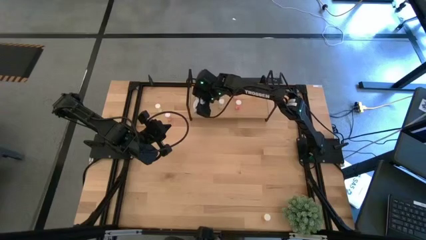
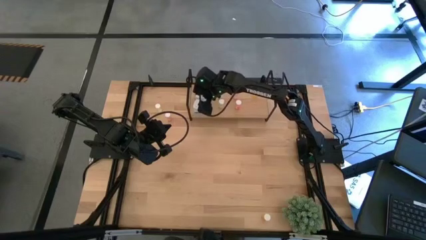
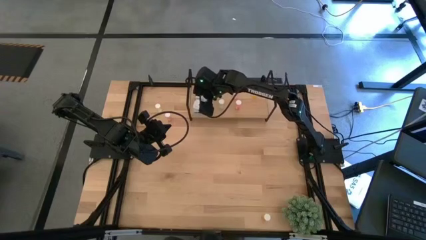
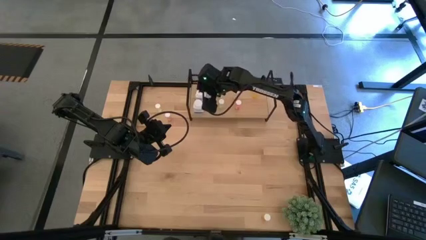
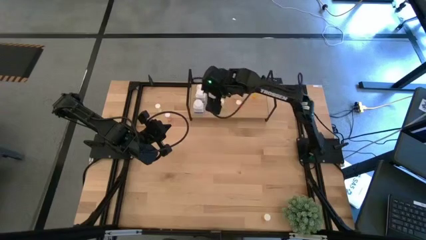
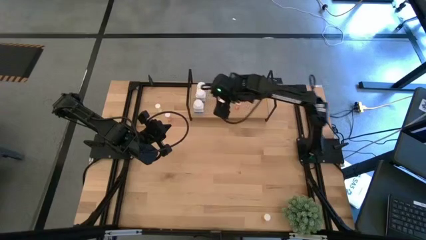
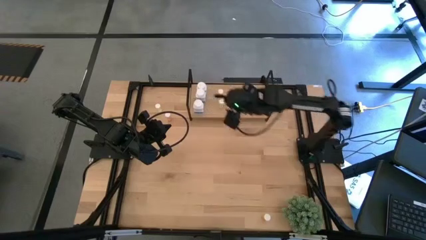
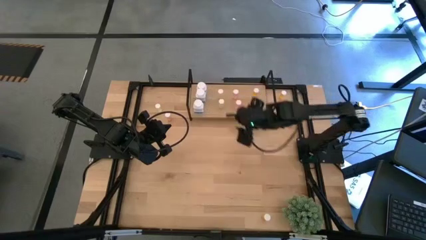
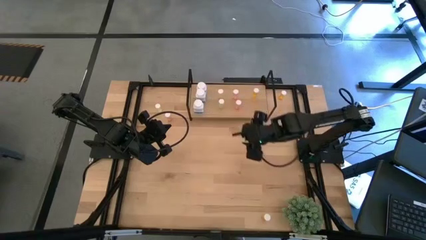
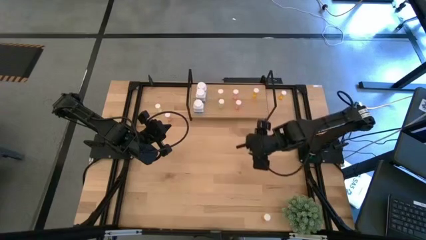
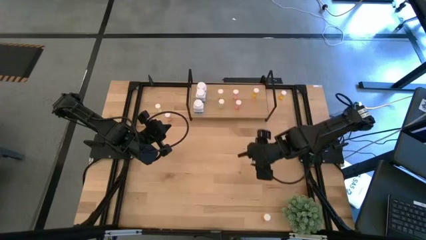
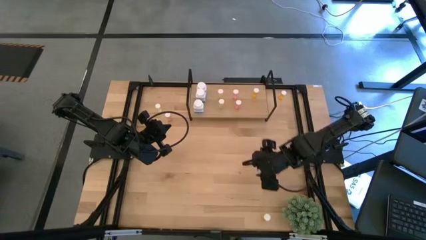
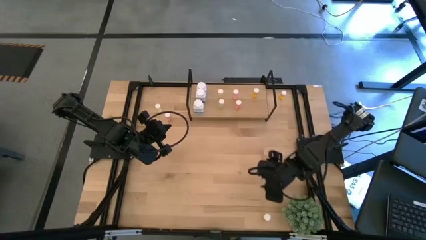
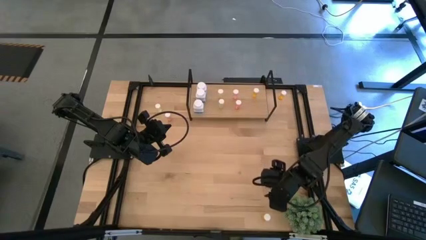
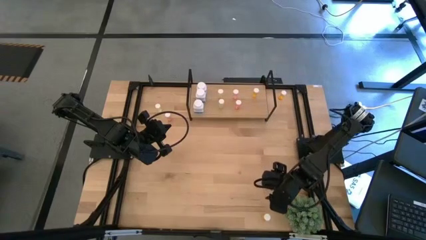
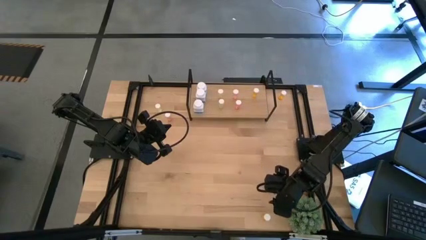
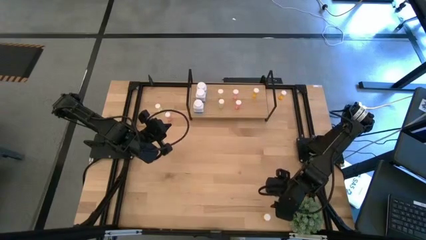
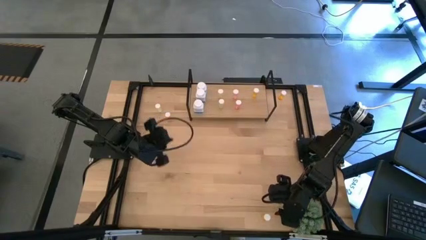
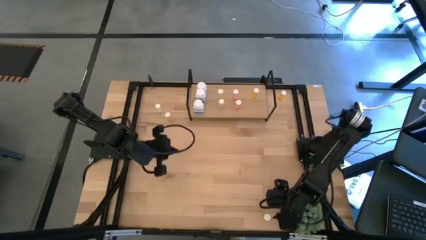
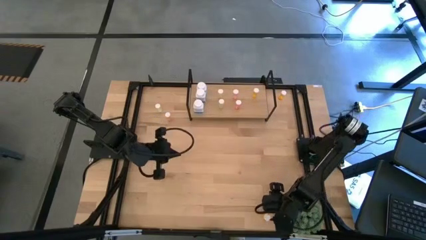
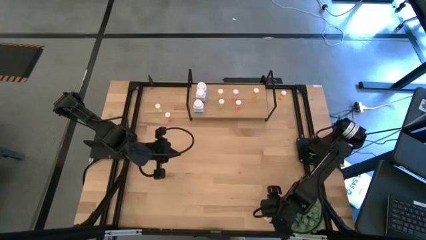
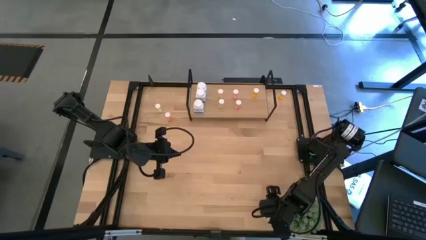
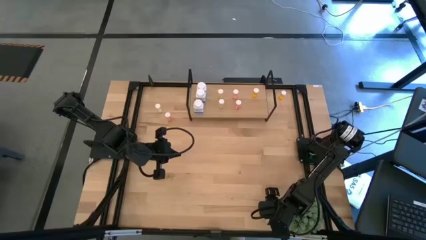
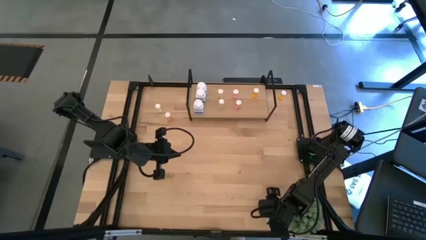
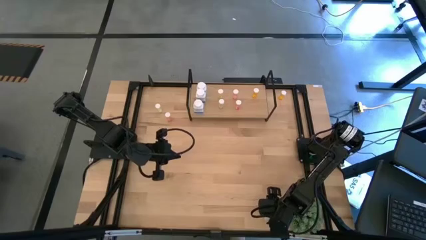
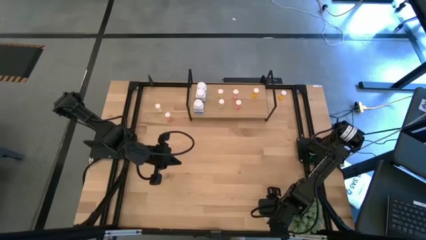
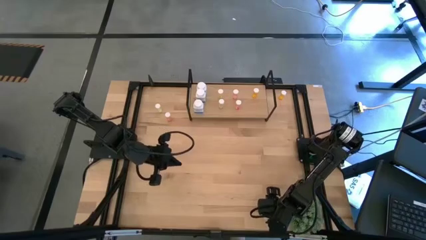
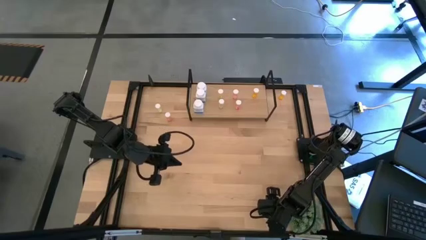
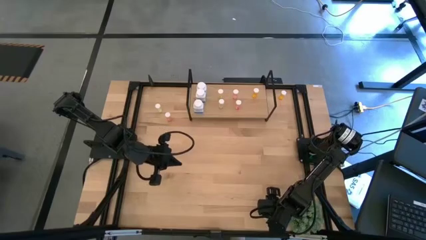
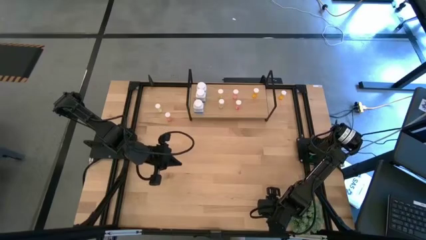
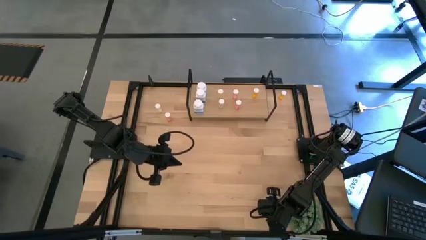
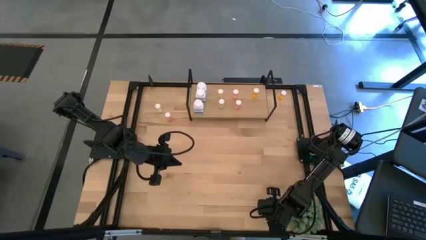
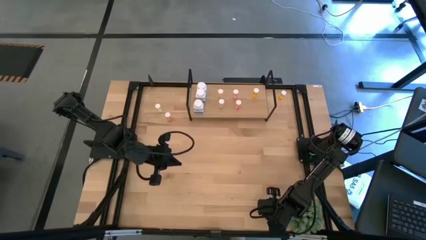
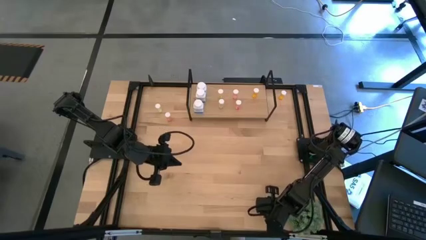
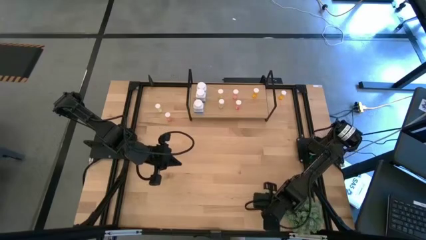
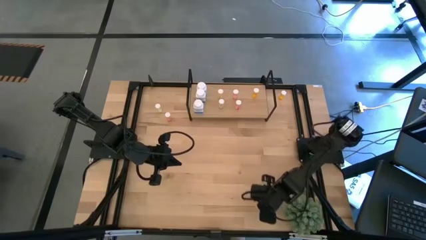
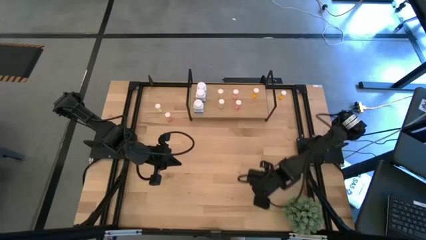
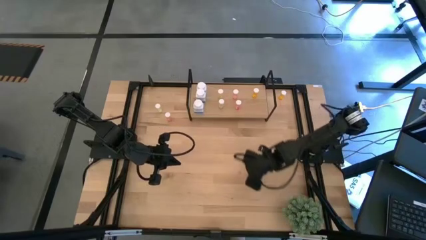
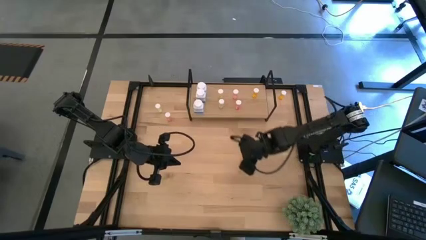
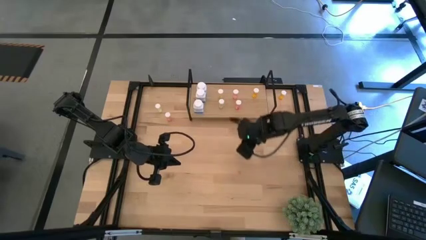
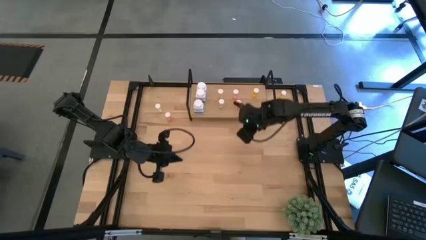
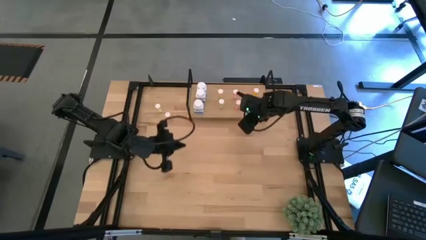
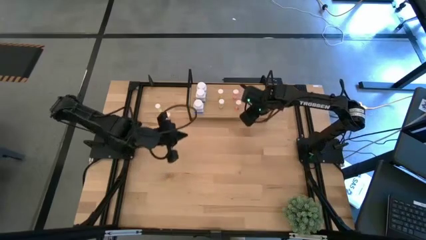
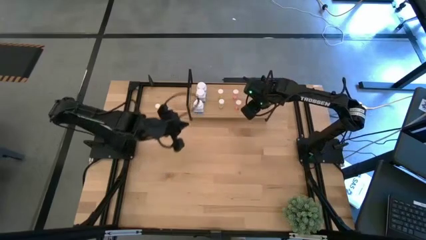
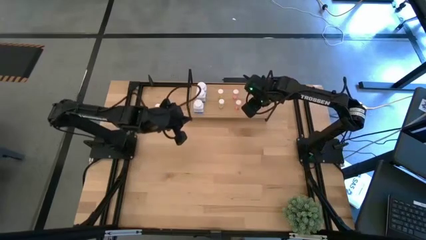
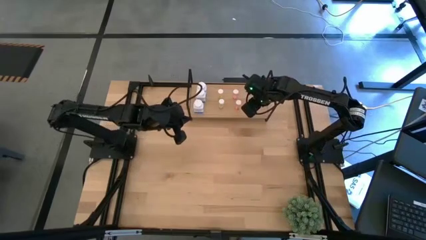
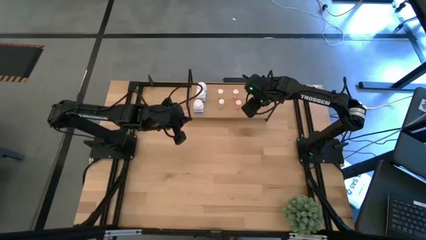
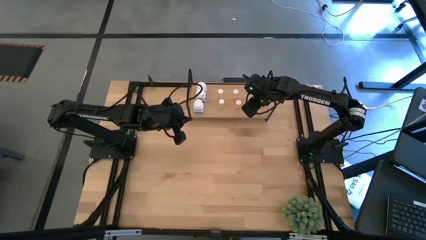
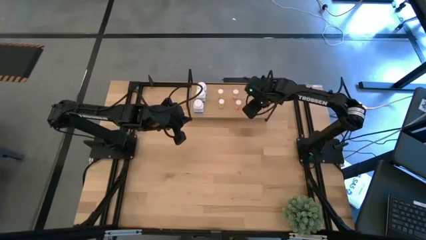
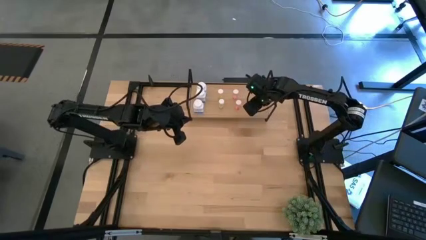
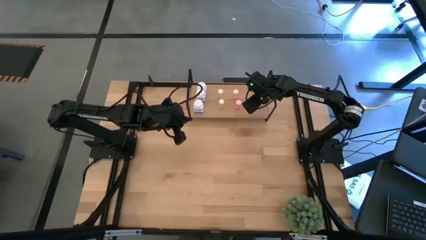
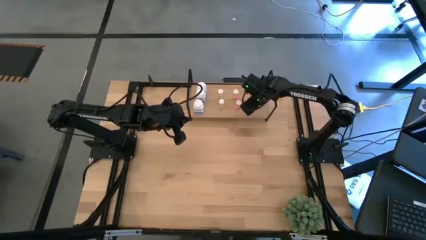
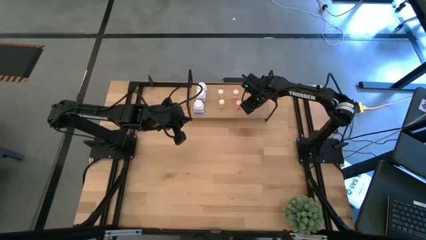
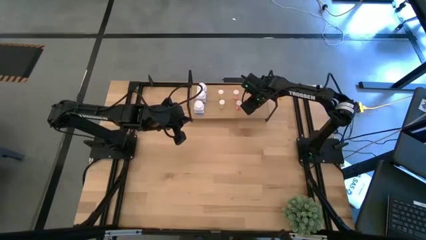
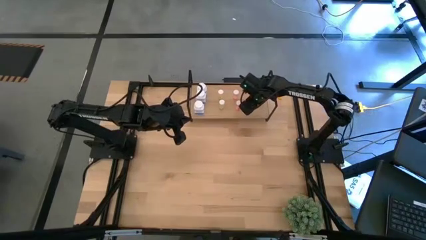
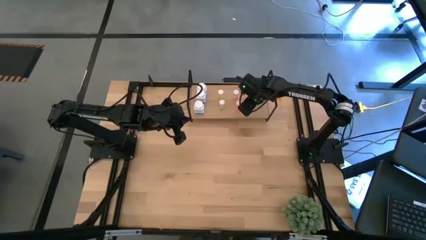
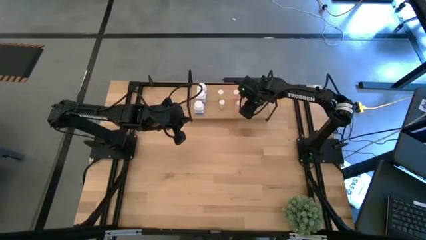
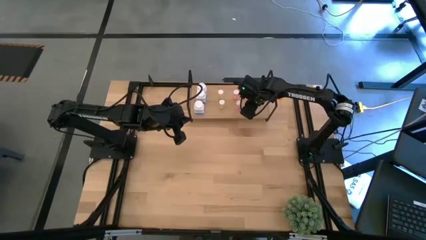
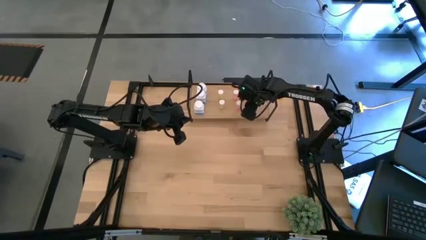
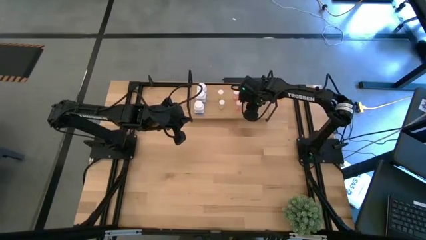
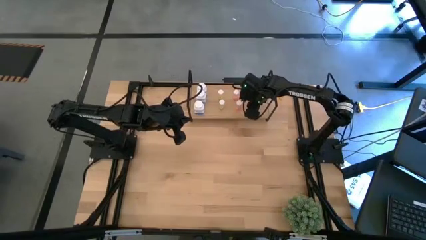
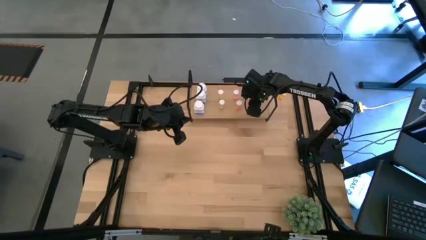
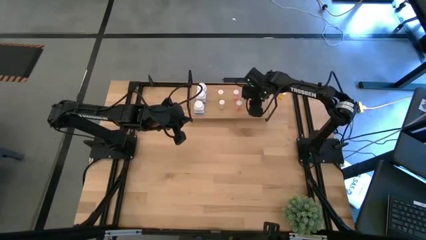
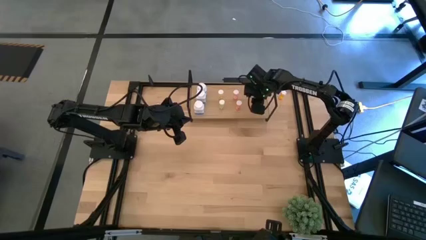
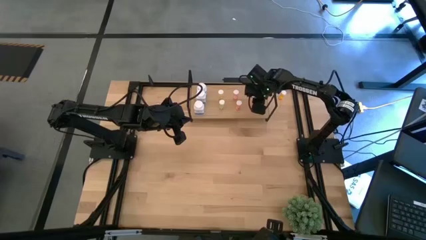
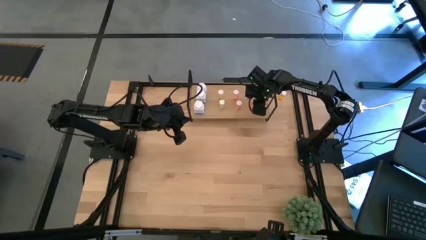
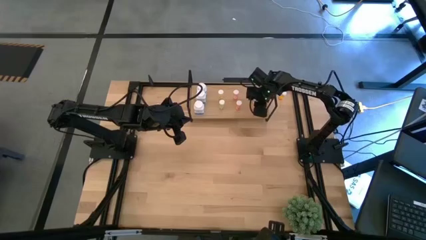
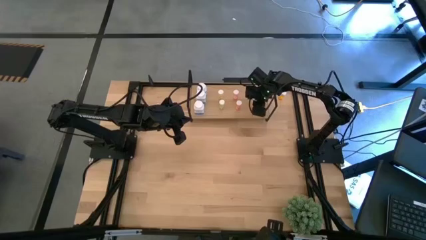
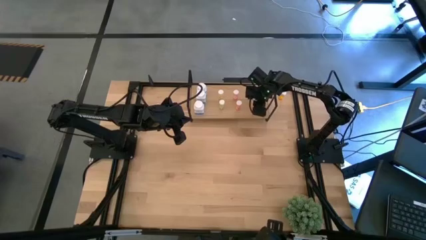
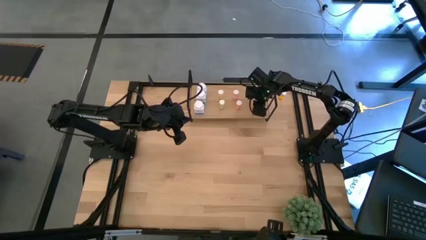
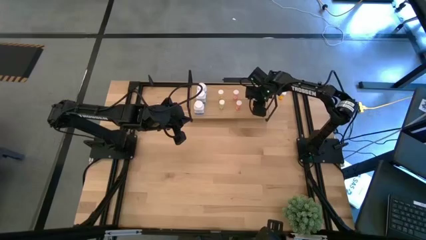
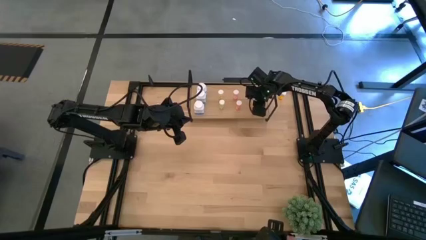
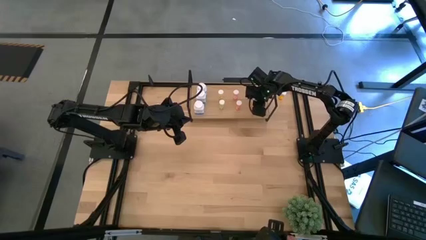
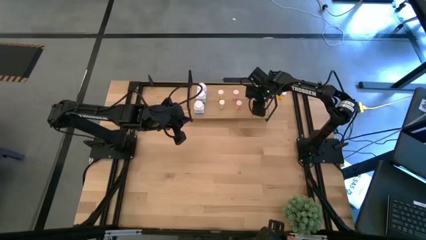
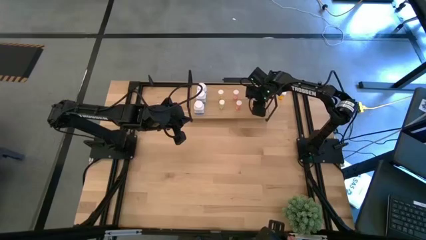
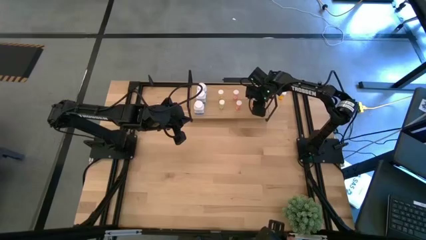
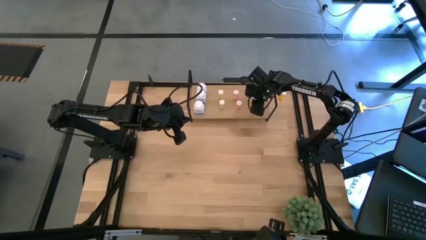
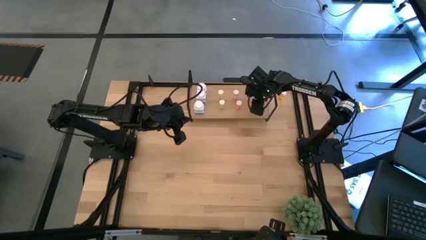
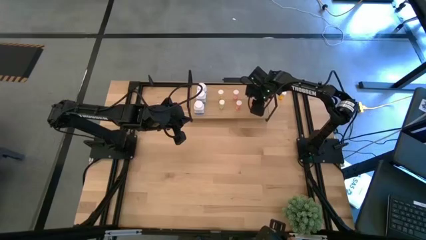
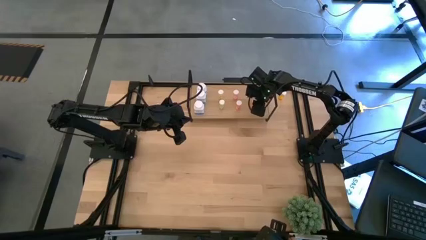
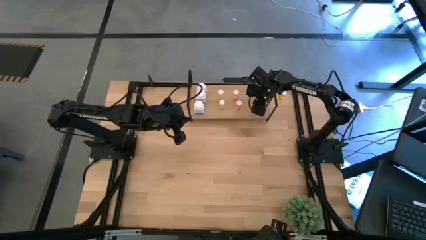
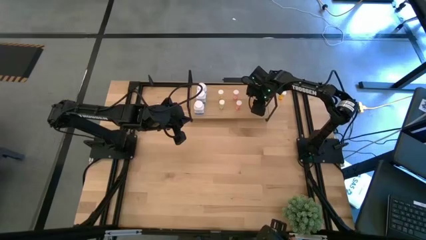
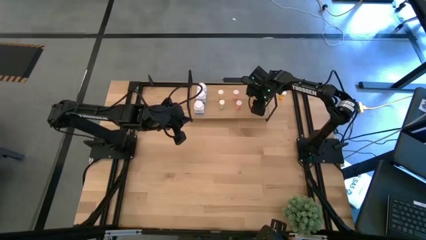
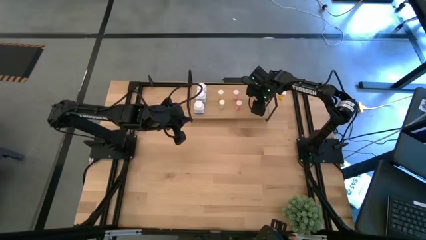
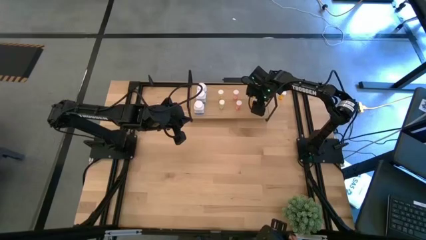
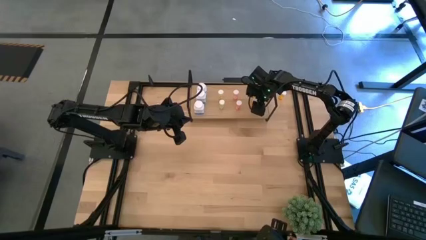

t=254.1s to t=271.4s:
Task: Pick and place medicine bottles onto shelf by color
Put the bottom orange pill bottle on the shelf aligned with the other orange pill bottle
